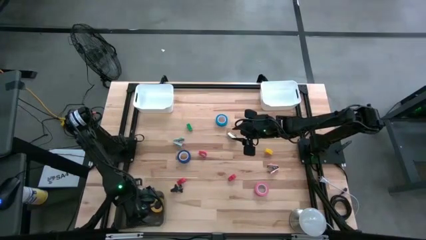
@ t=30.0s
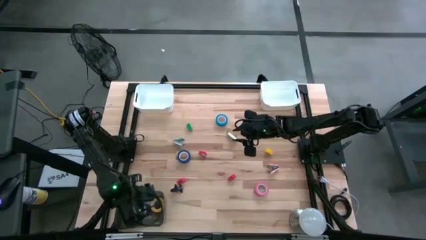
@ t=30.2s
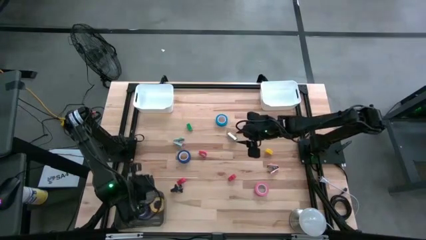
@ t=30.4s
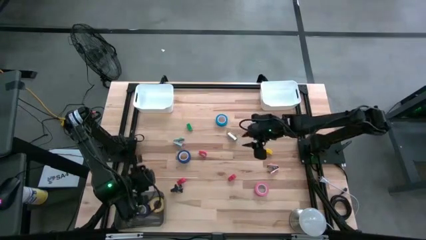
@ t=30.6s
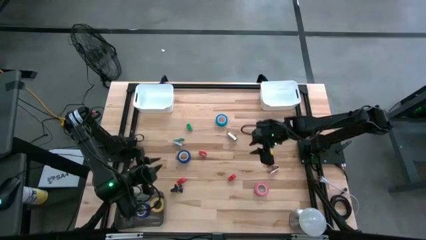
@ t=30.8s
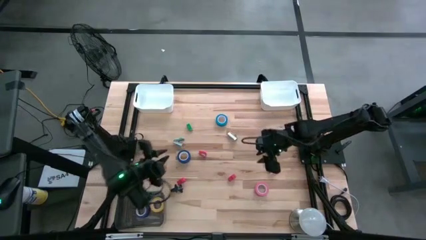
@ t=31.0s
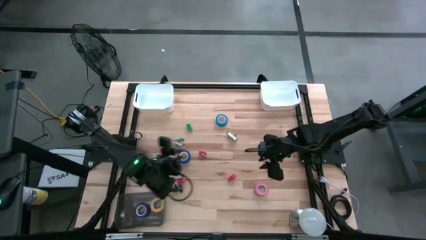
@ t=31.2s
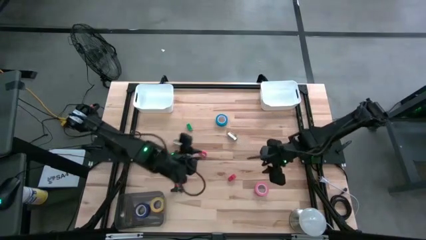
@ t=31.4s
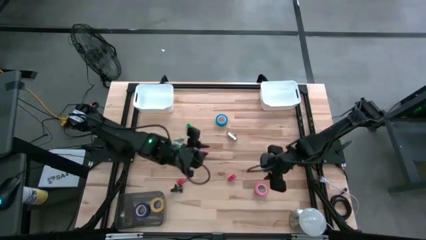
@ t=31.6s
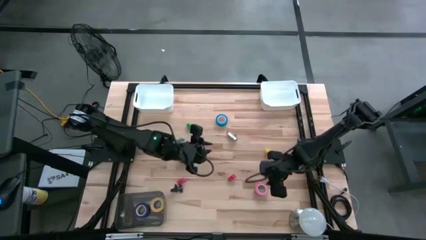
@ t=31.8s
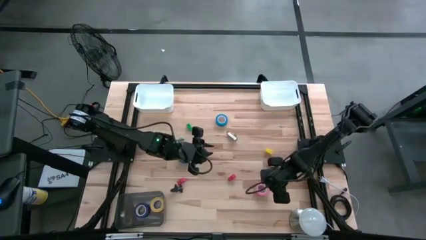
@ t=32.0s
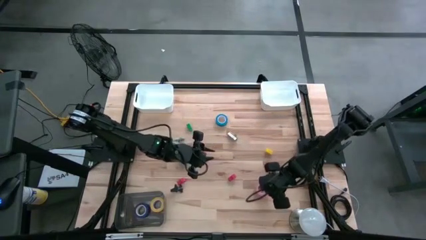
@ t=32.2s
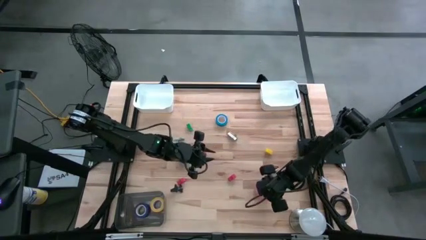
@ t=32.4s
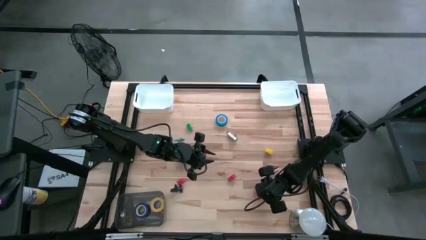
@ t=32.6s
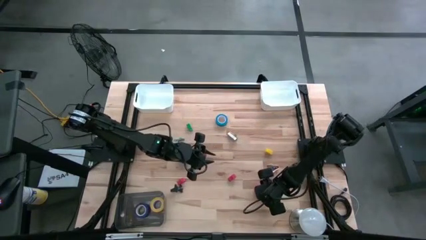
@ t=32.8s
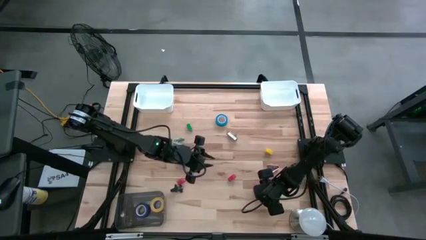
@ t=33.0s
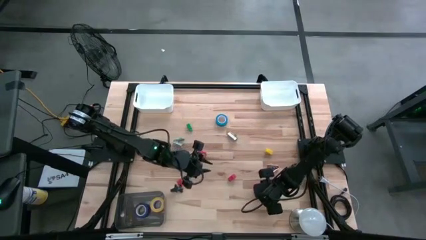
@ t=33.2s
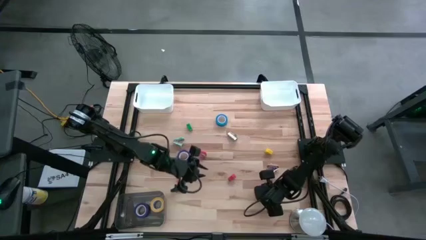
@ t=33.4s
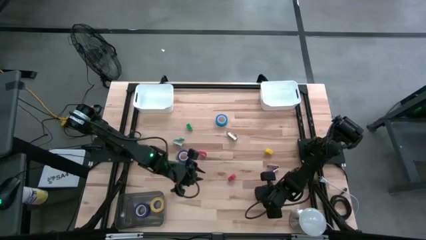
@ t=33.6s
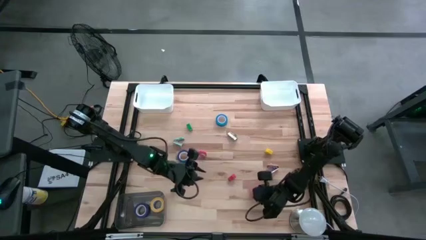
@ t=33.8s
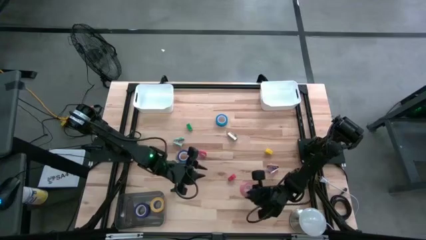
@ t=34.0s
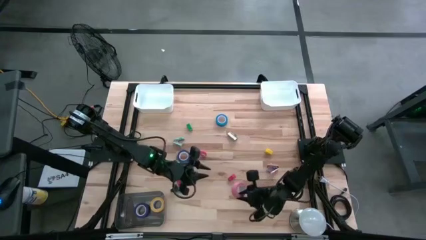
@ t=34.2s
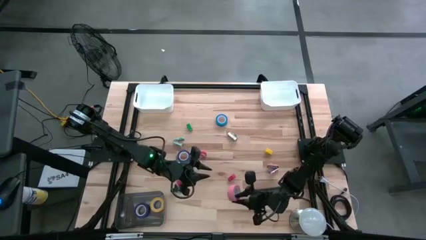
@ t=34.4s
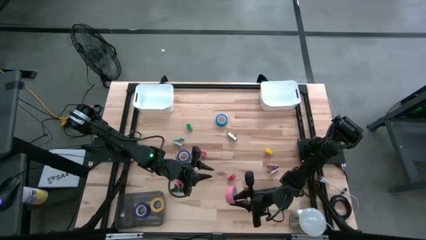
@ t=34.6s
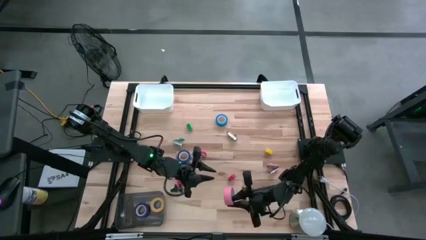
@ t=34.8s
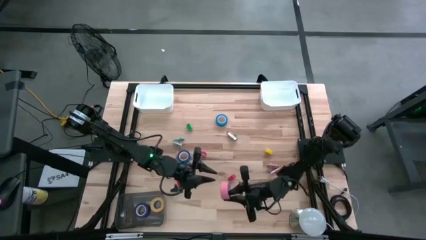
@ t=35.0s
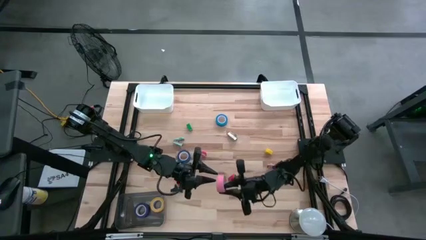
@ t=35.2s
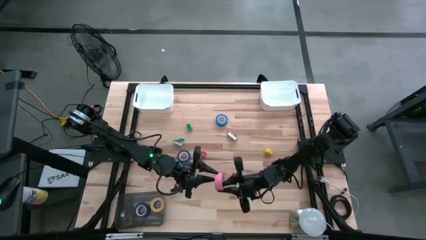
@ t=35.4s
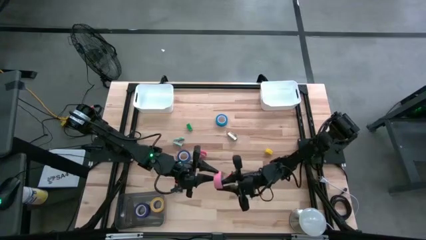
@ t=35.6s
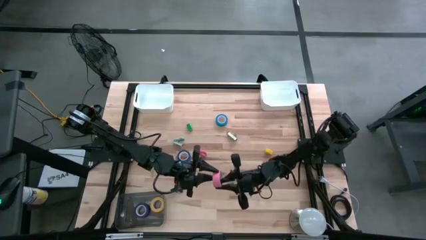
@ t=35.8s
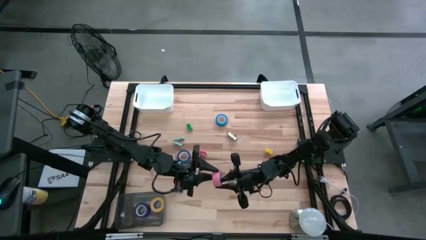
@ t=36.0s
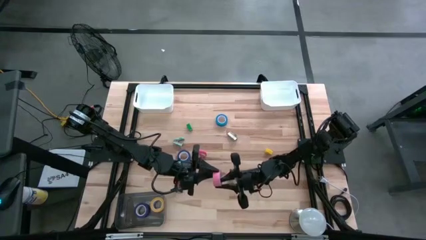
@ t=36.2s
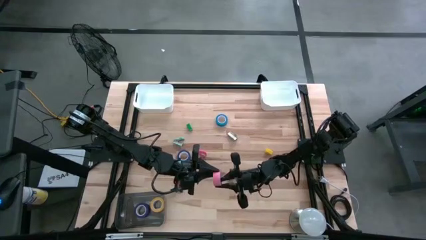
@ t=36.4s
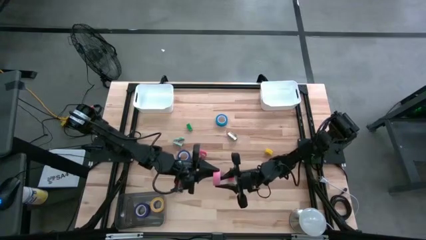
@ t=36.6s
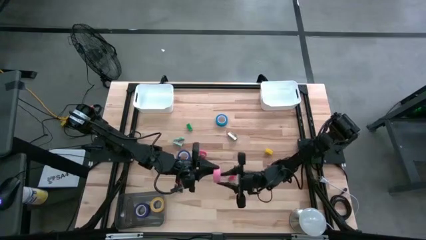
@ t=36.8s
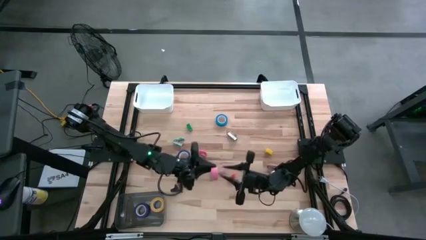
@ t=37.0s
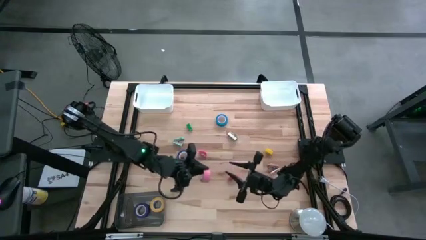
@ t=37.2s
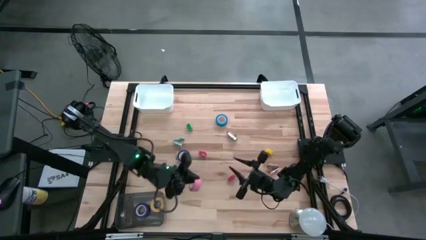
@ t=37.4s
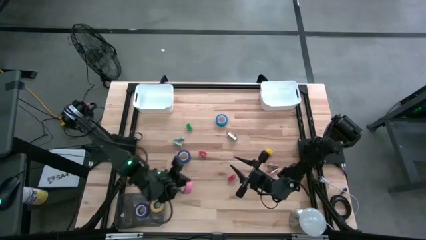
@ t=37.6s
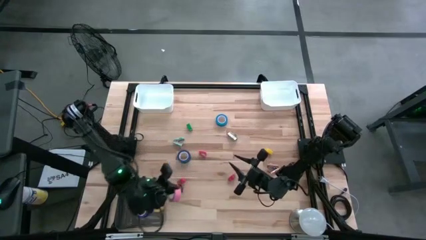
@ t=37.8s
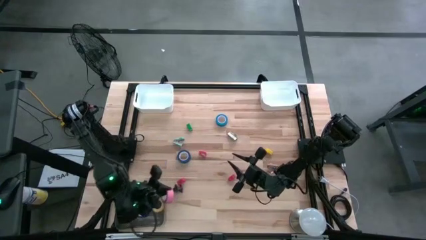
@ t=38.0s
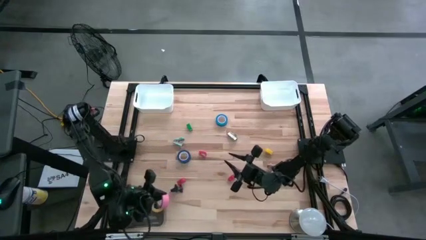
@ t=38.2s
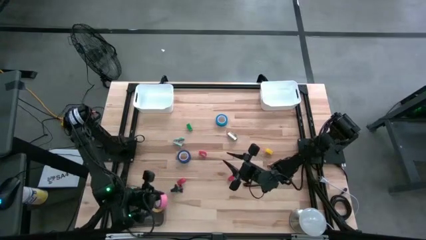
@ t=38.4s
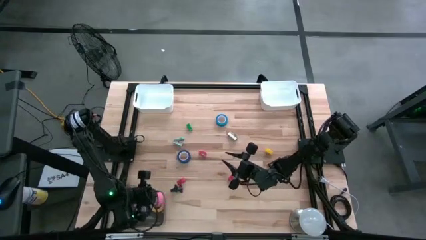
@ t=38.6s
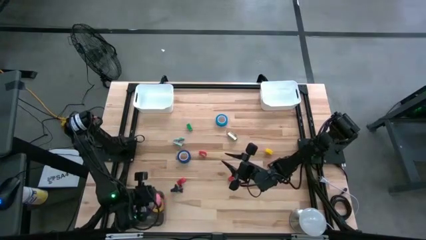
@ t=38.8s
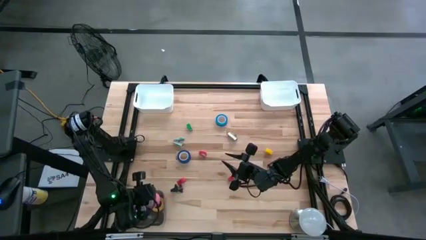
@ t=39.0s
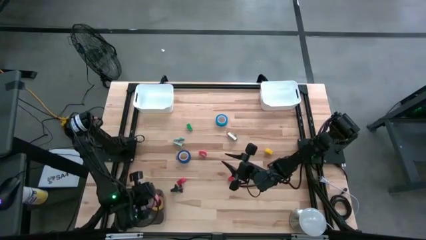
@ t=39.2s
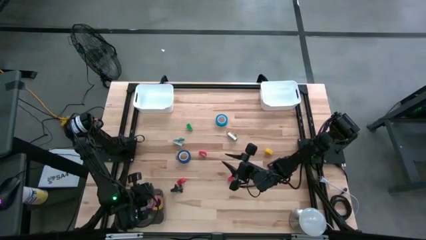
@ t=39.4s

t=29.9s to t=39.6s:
Task: Pick and place Stapler, Stapler remover, tape
Put the pink tape into the black bin
